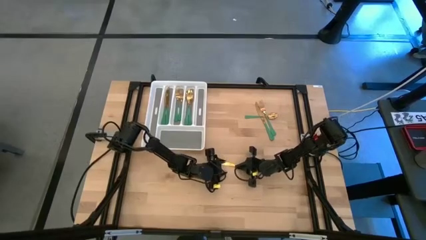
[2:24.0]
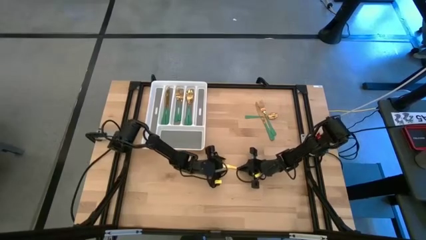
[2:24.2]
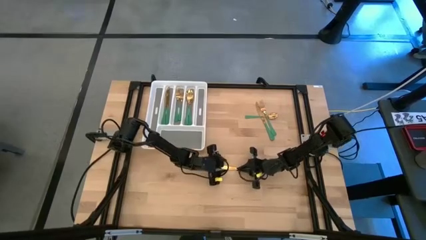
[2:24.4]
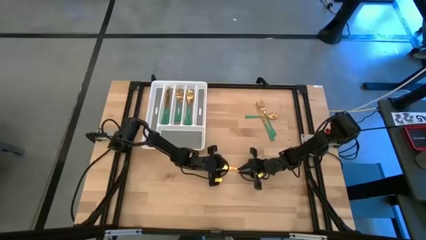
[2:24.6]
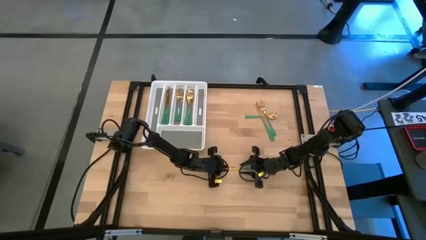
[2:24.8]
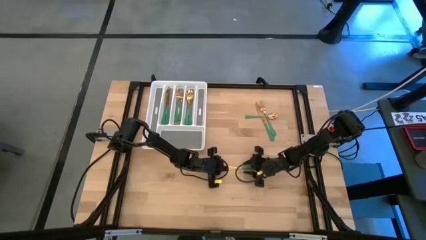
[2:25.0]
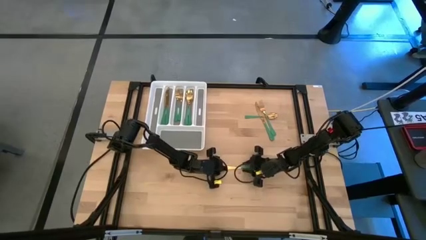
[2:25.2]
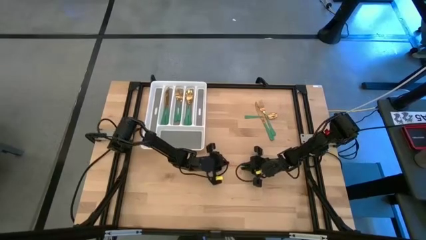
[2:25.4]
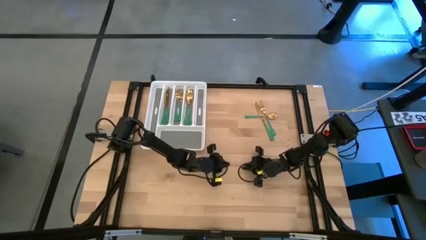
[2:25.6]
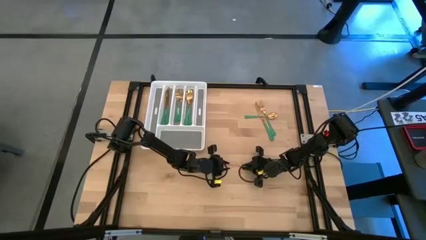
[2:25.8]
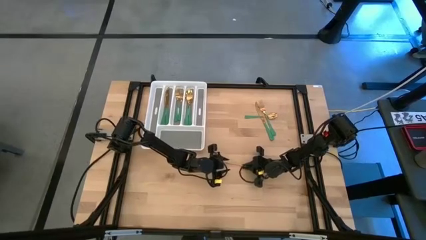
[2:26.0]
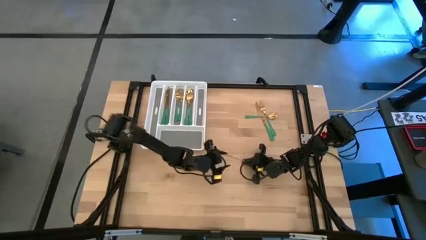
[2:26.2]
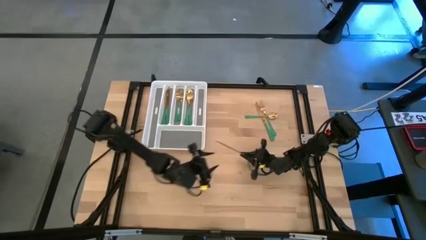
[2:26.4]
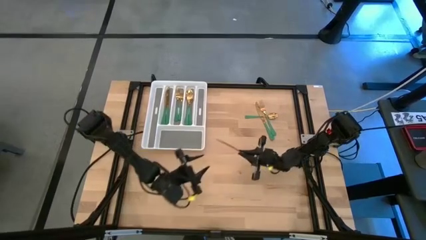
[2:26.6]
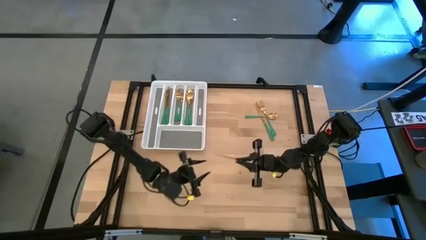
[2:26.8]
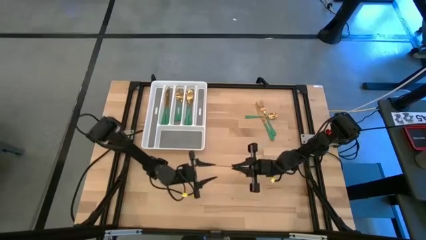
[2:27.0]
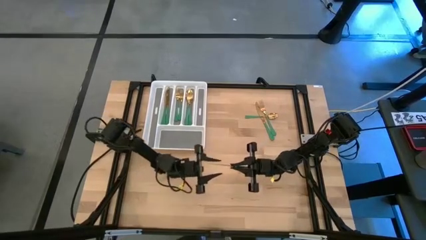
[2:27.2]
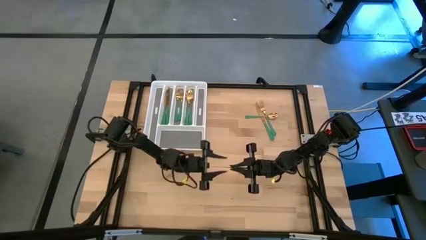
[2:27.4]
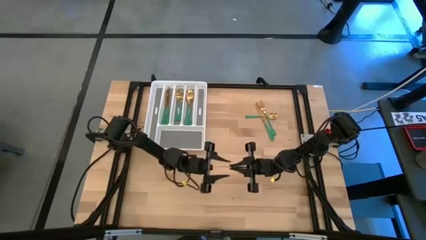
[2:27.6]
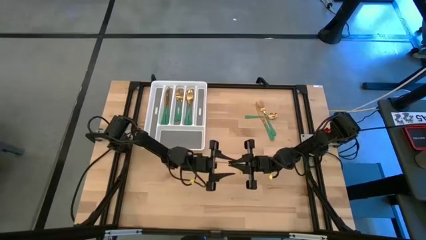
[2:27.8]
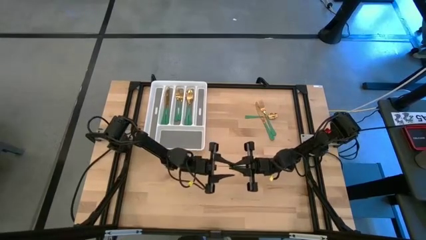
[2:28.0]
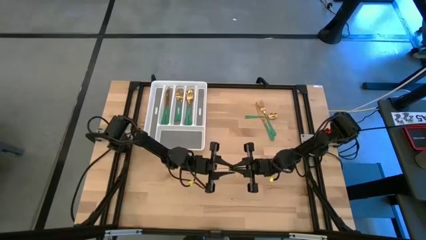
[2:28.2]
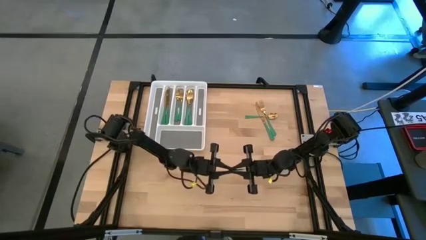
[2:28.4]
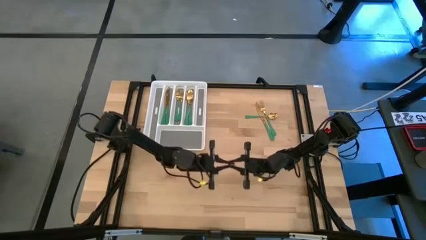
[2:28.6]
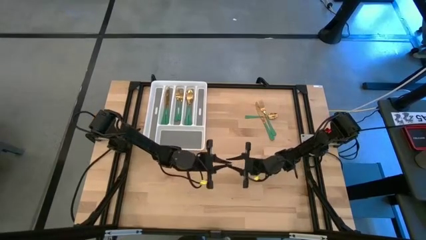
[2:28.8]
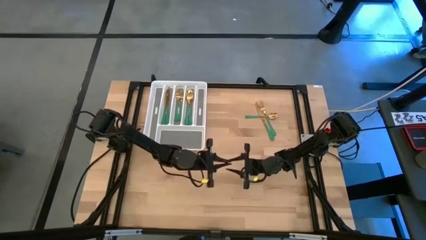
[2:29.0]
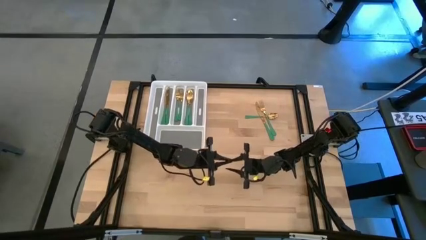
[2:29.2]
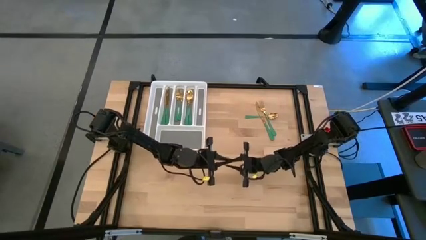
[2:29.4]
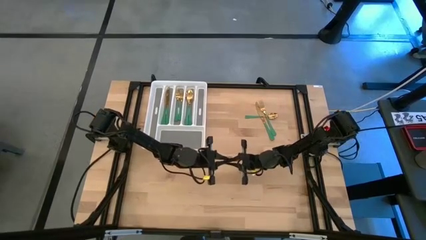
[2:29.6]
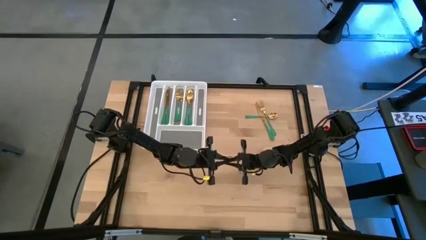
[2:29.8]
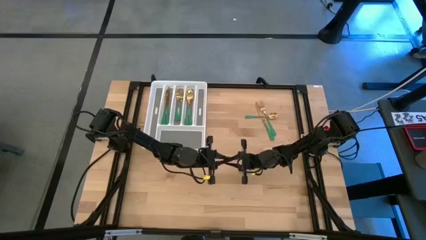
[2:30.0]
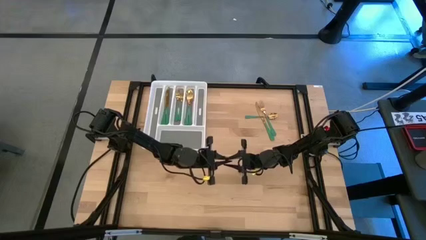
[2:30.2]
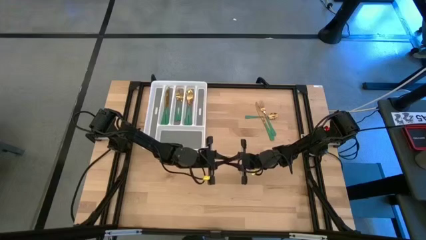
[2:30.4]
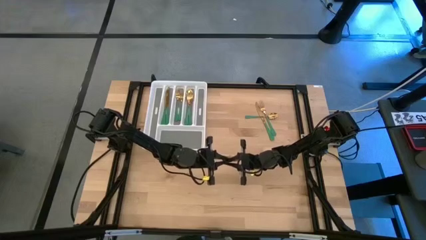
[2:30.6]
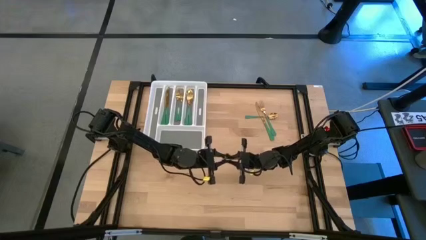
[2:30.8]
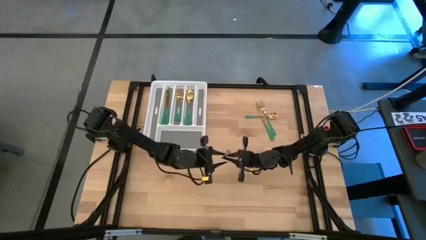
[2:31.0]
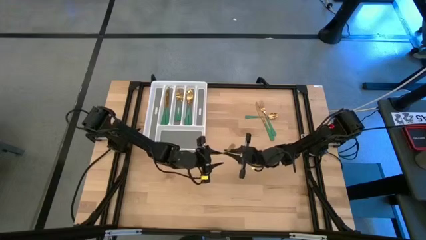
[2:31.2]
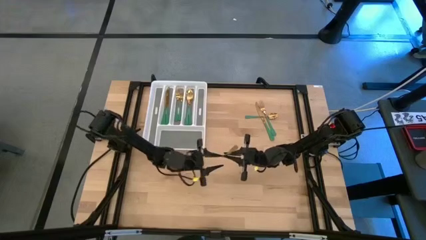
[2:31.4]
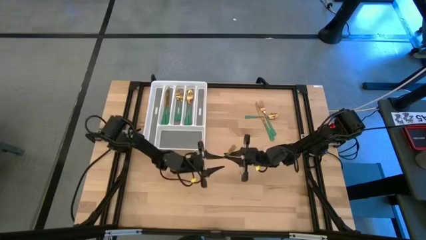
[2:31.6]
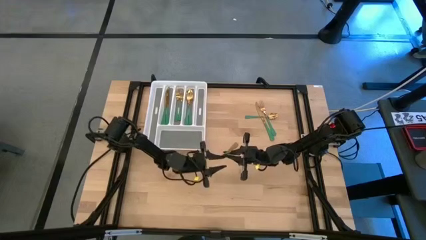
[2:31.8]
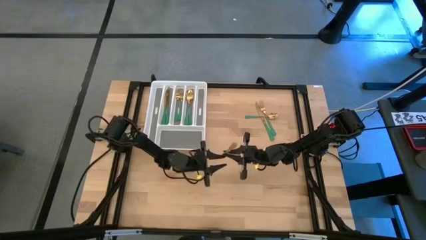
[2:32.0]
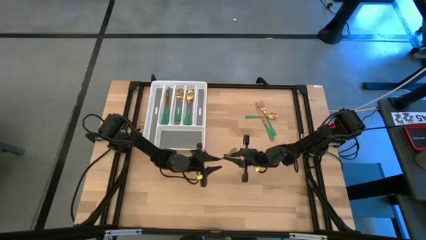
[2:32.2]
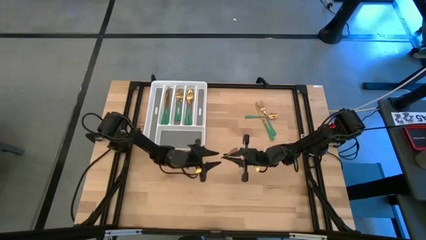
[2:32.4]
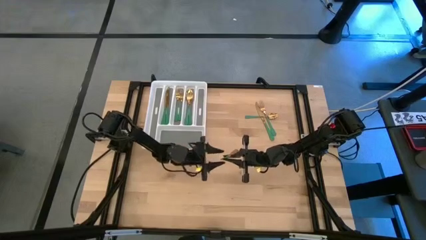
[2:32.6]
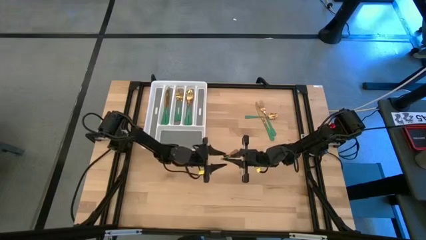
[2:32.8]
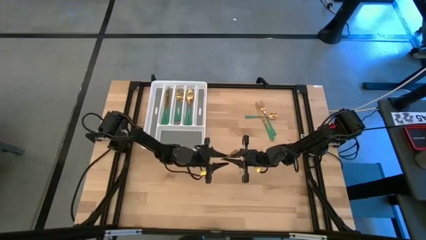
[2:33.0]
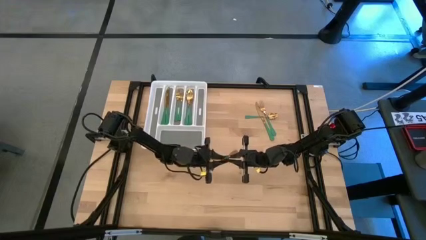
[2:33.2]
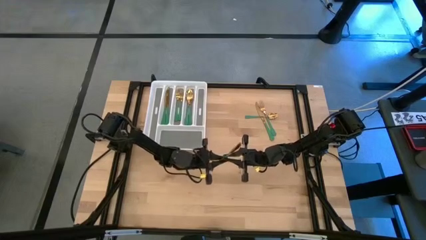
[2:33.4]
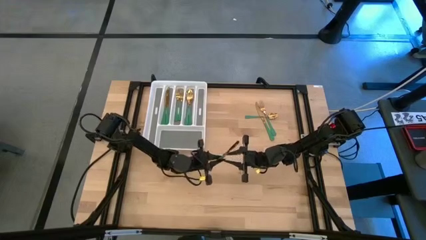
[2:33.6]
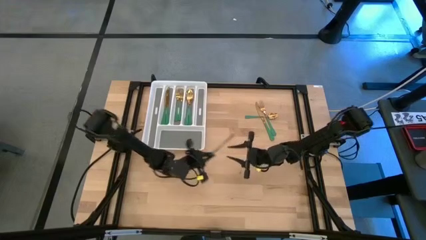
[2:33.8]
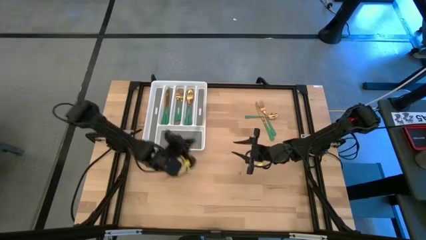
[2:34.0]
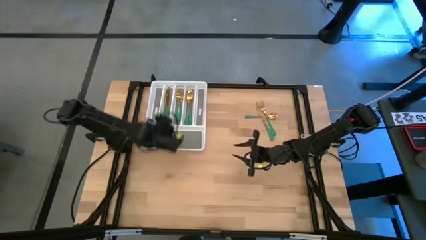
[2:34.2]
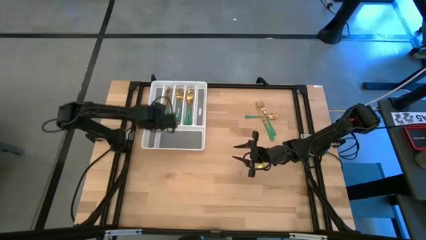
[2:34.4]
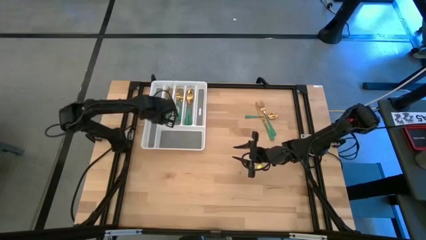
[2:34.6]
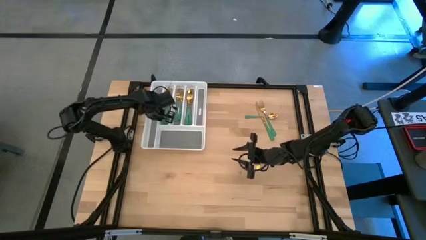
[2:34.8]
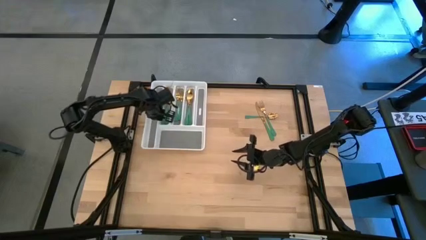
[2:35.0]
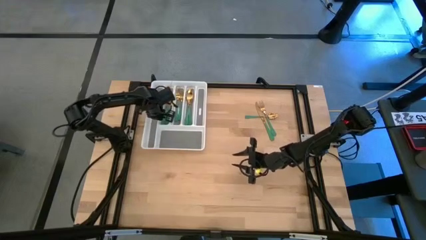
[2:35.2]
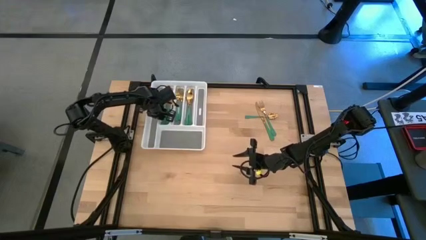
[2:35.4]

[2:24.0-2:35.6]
Task: Sort silverware
Put the green knife into the white cutlery tray
